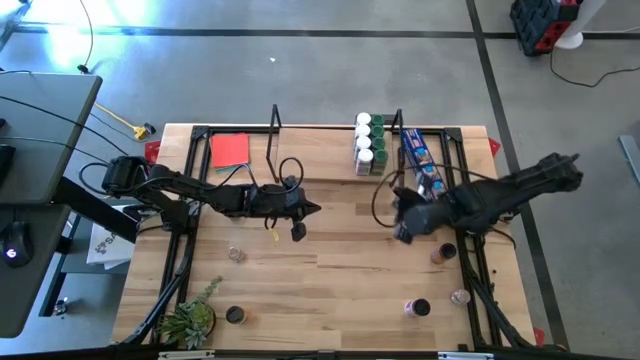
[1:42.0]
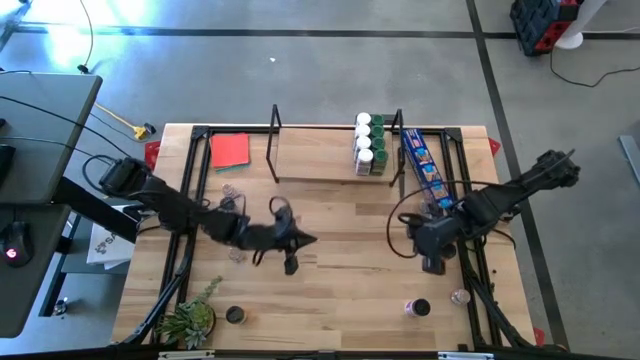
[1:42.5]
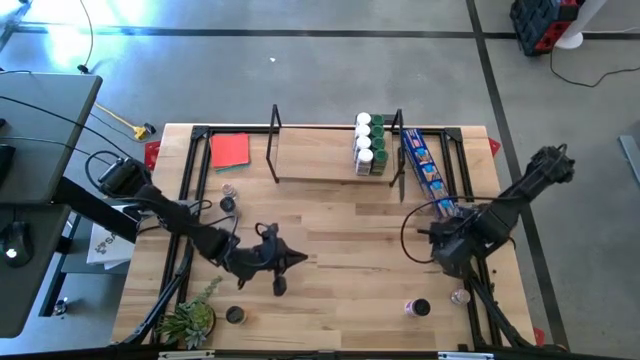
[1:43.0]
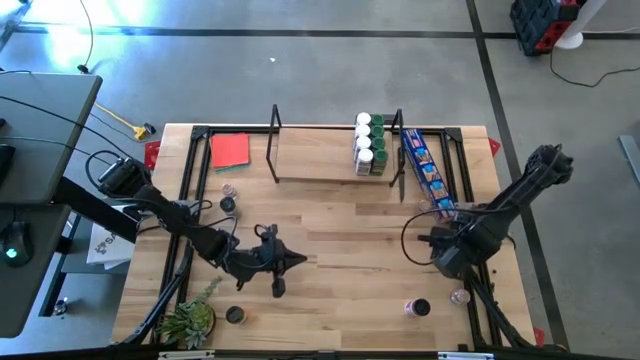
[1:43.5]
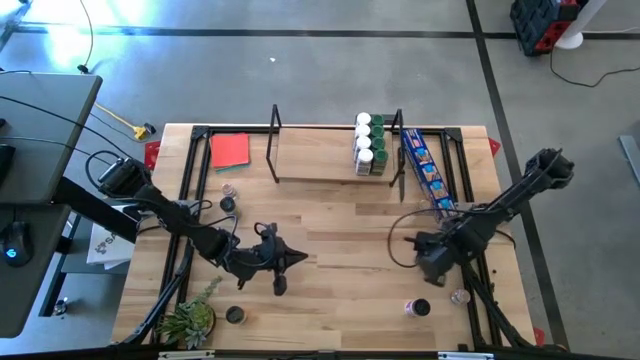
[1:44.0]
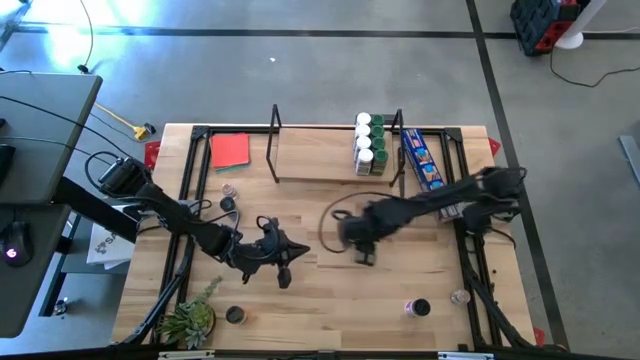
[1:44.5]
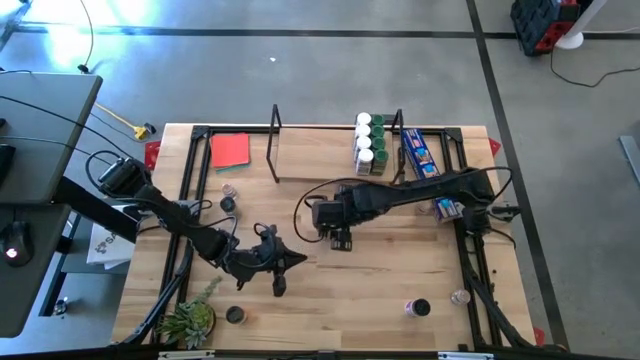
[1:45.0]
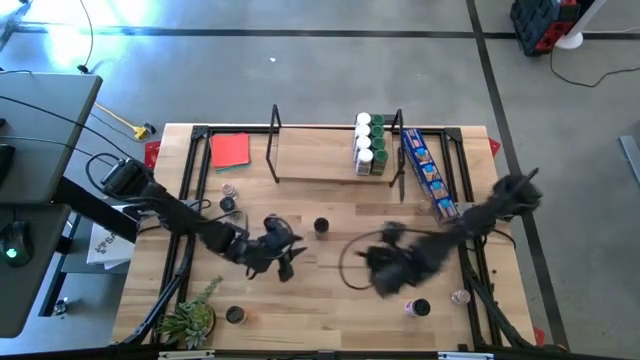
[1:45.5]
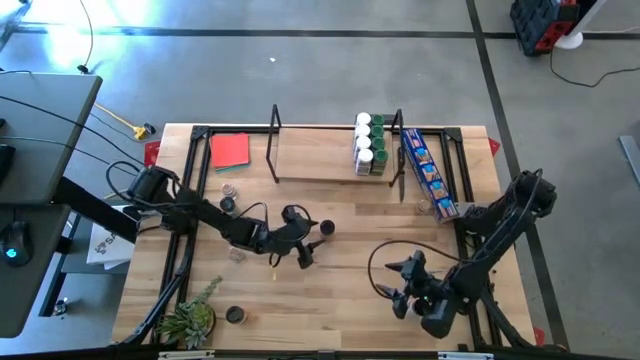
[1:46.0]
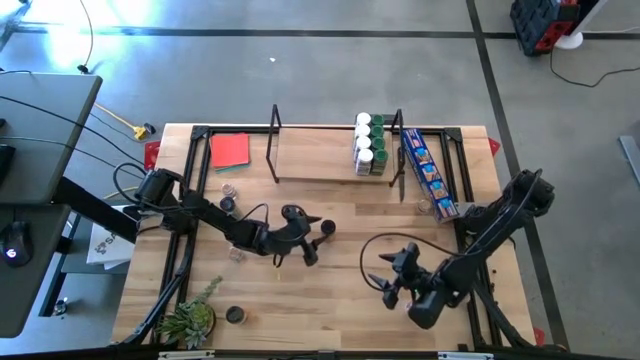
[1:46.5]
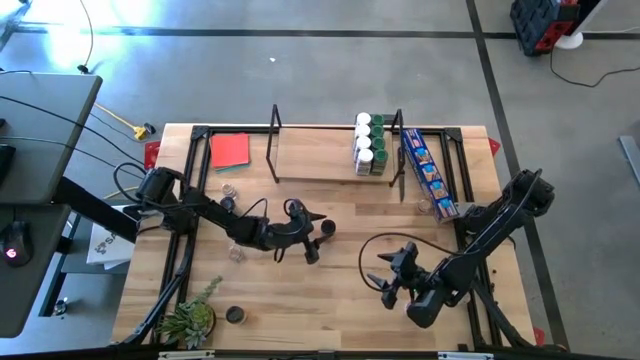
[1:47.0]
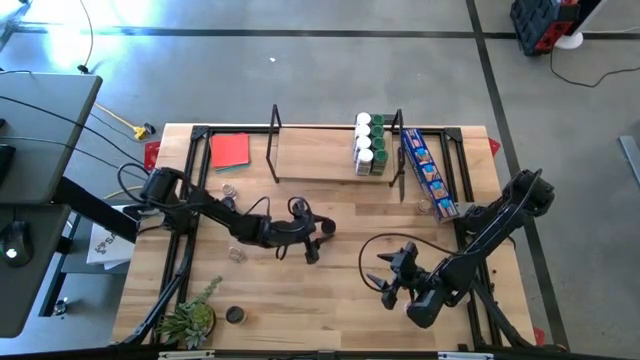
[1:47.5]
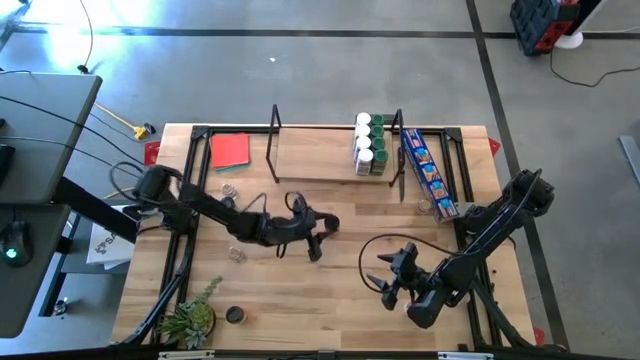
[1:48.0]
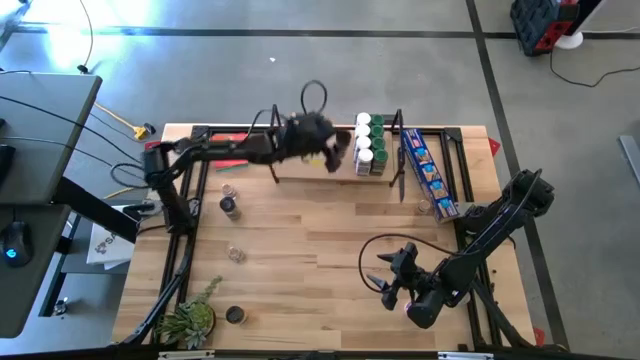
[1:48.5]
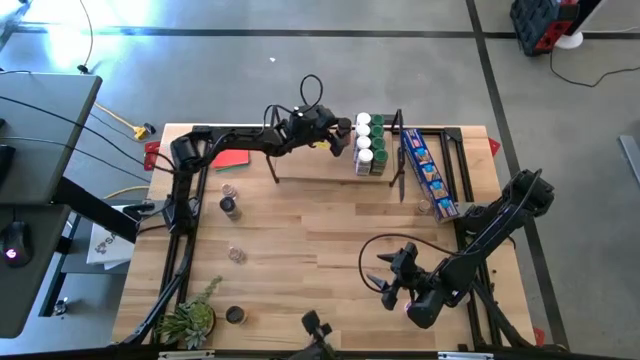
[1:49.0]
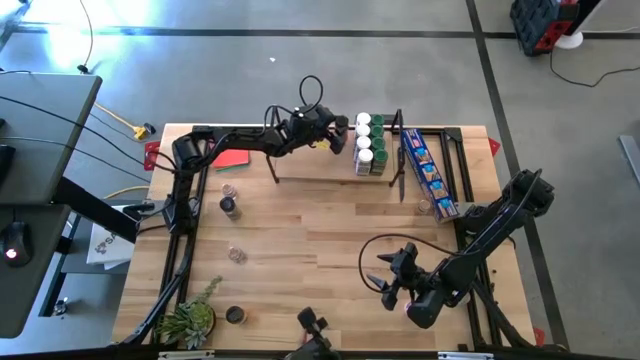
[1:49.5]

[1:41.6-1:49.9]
Task: Shelf spices
Put the top right black seasoning bottle on the shelf

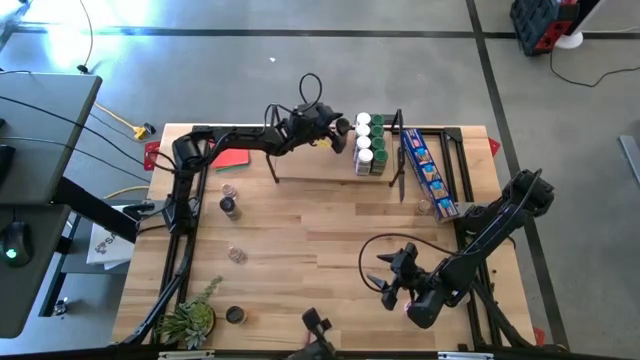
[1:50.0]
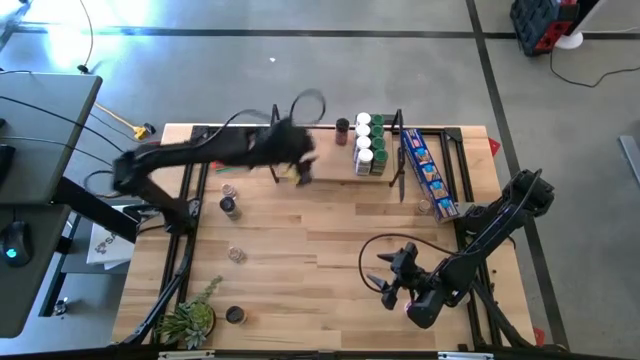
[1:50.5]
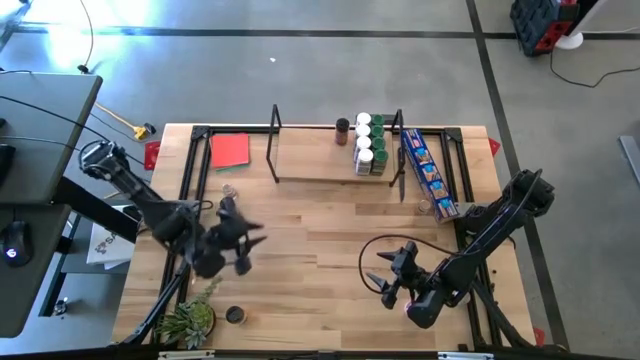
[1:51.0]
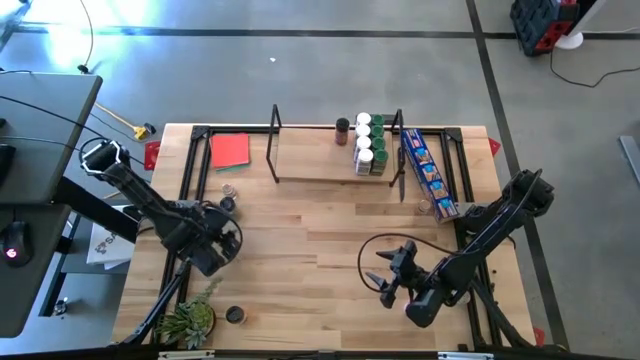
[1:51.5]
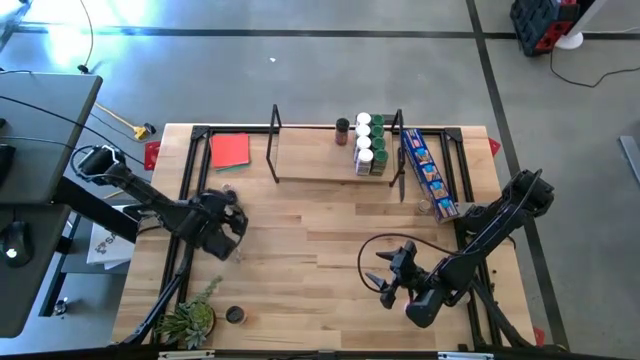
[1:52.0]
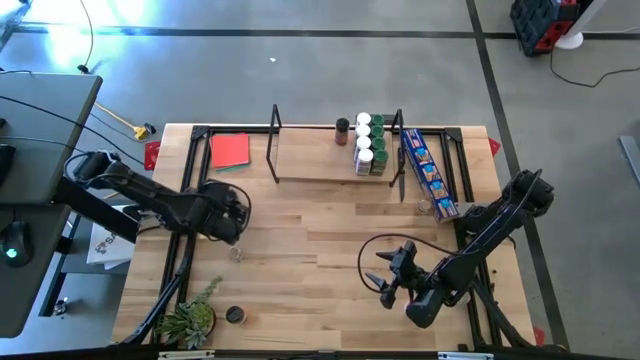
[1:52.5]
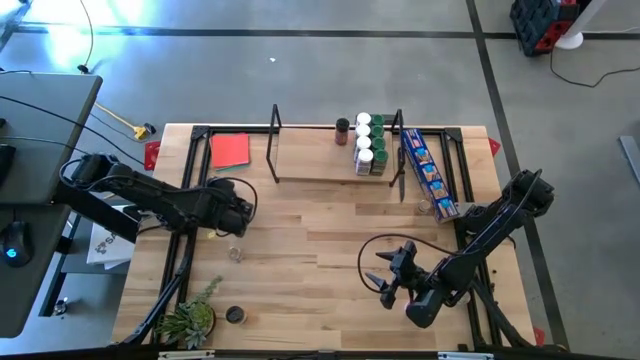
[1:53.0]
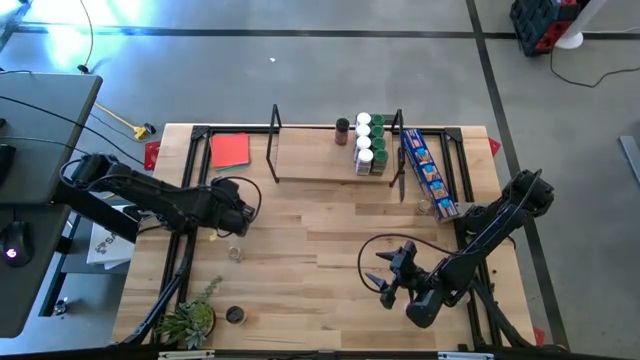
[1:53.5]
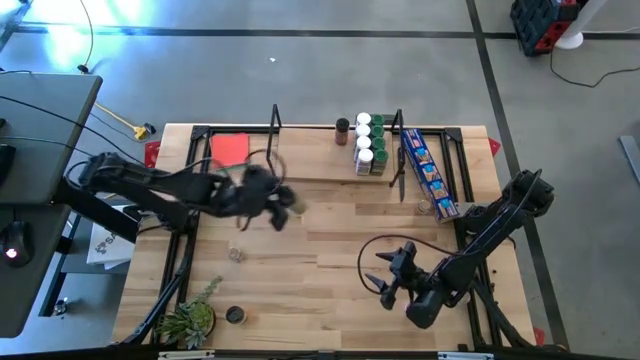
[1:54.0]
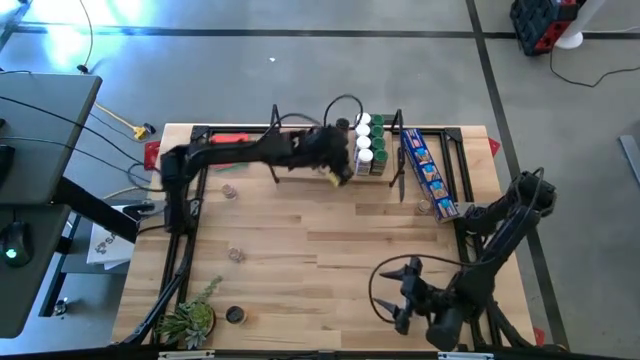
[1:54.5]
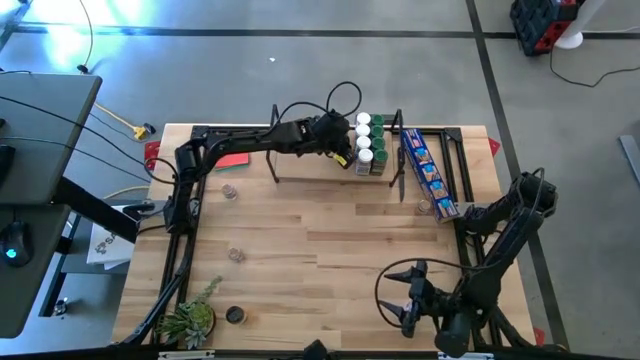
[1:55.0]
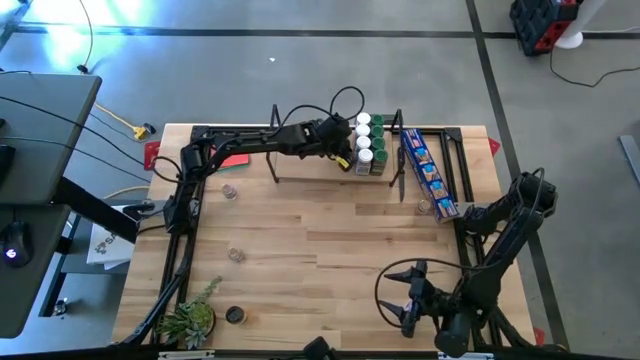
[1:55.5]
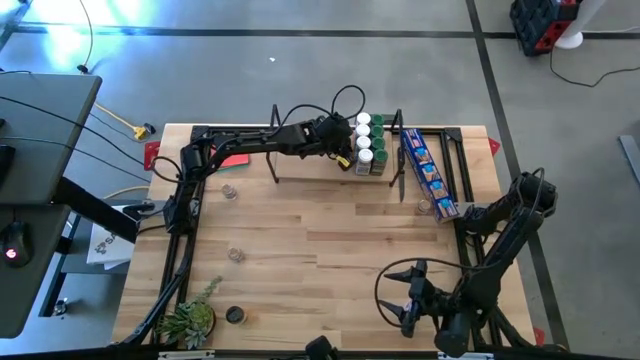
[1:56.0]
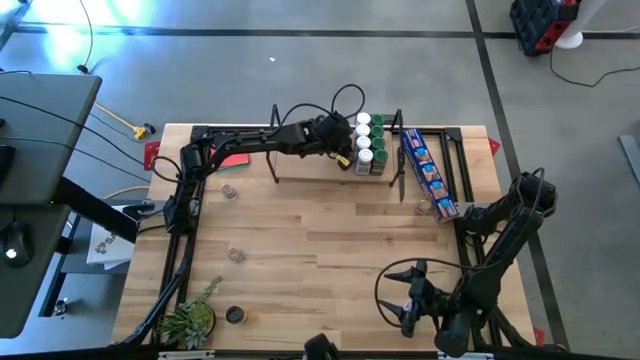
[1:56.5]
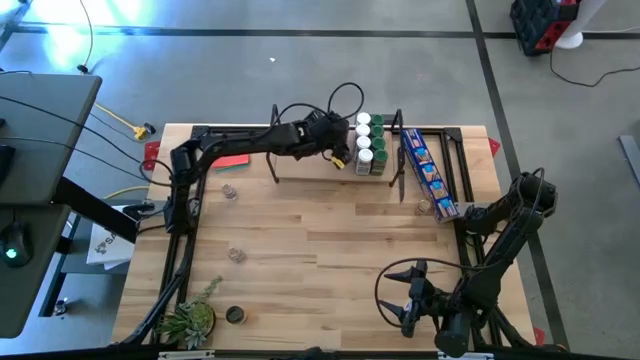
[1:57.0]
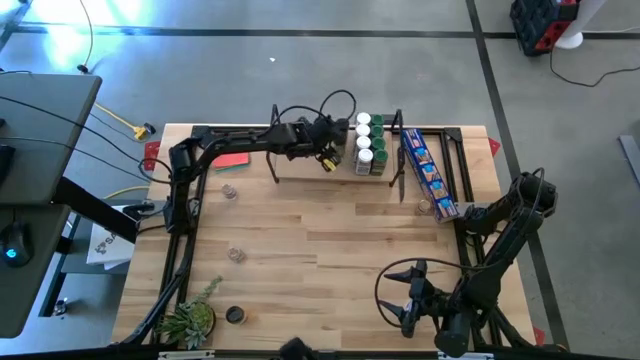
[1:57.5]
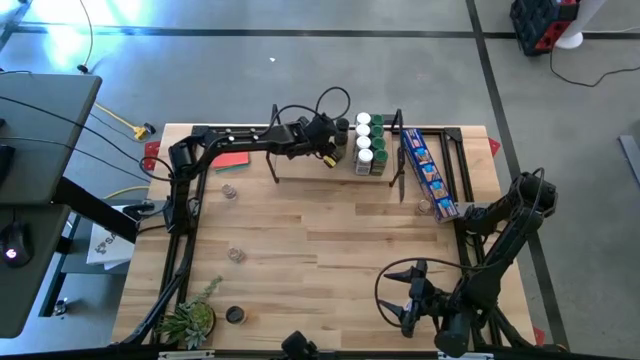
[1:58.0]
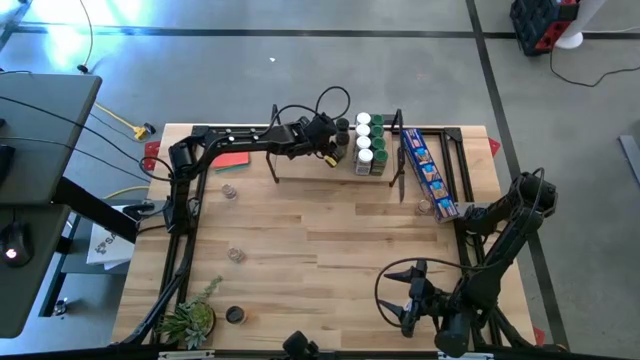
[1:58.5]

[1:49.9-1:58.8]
Put the top left black seasoning bottle on the shelf aligned with the other black seasoning bottle

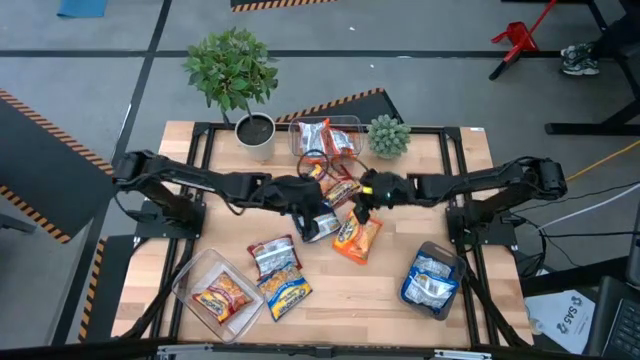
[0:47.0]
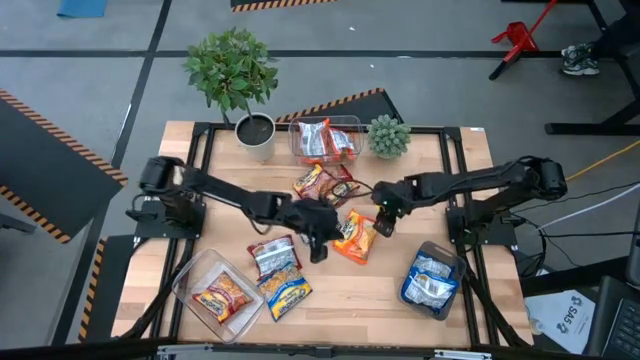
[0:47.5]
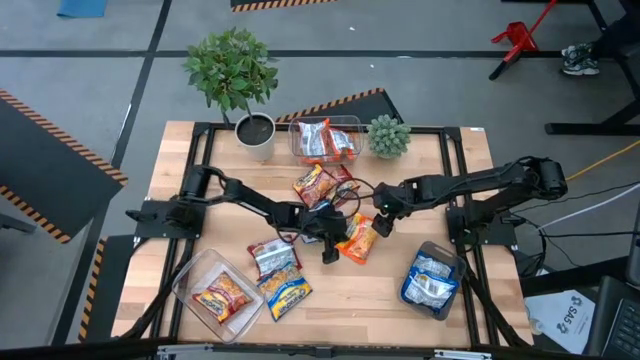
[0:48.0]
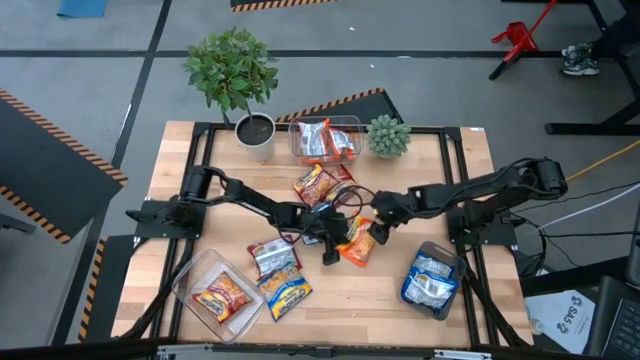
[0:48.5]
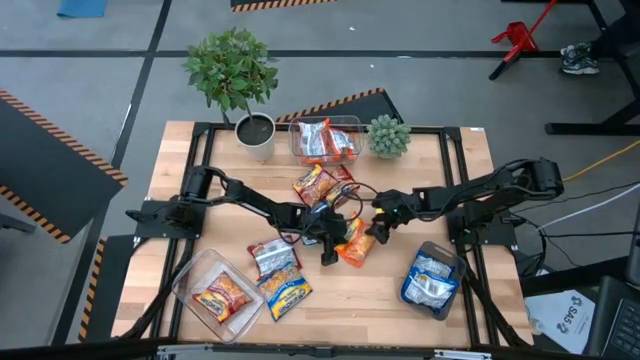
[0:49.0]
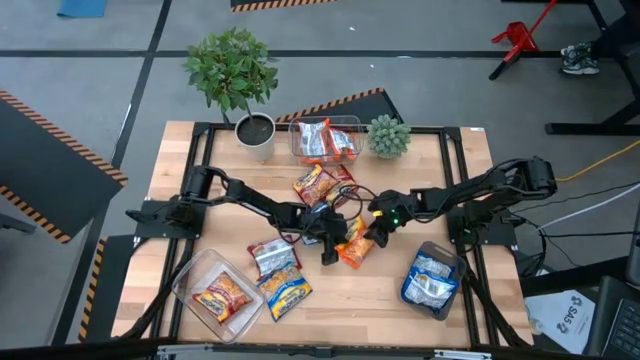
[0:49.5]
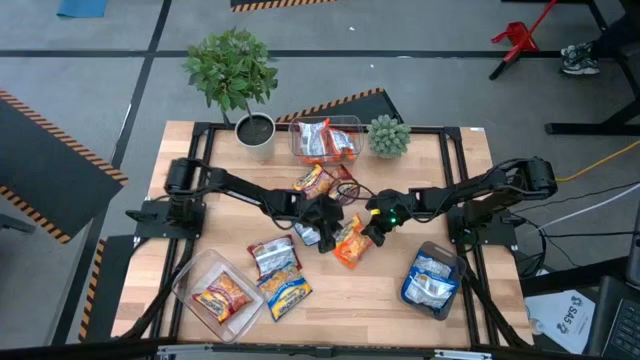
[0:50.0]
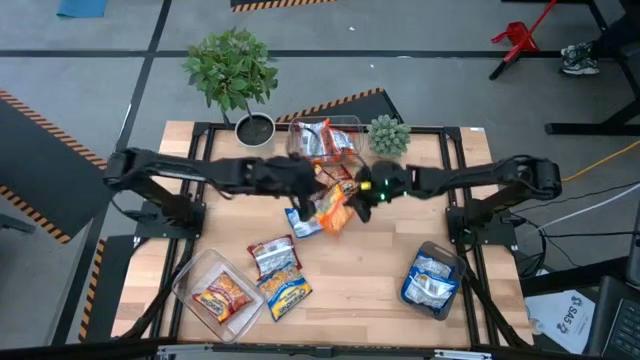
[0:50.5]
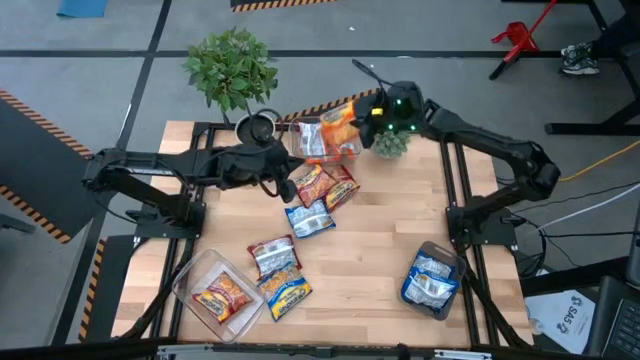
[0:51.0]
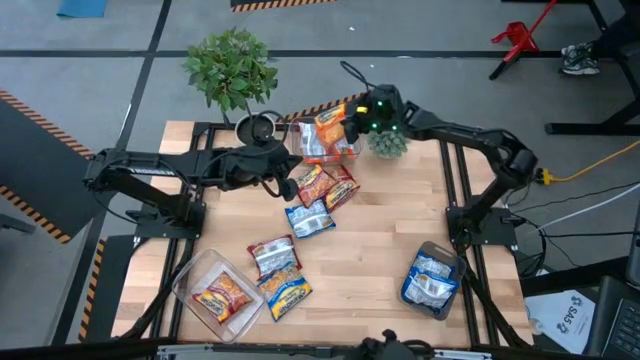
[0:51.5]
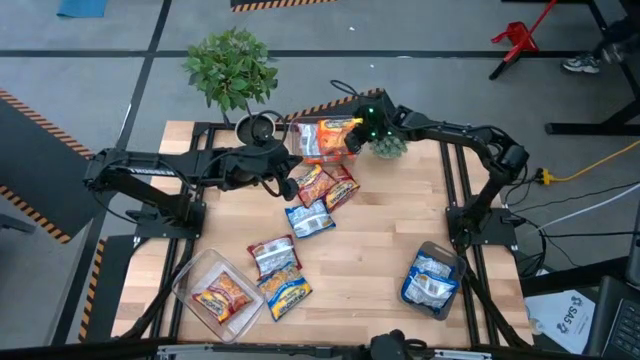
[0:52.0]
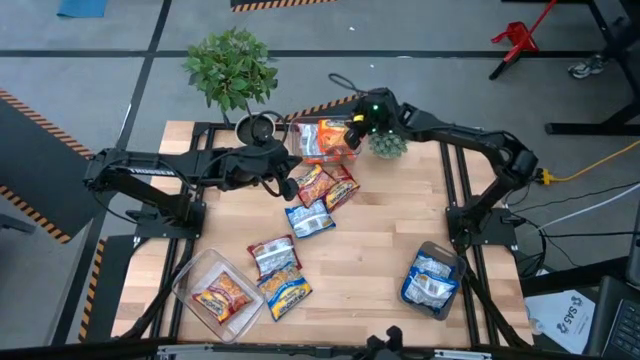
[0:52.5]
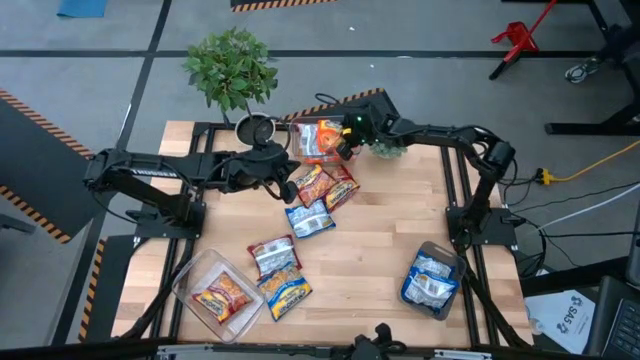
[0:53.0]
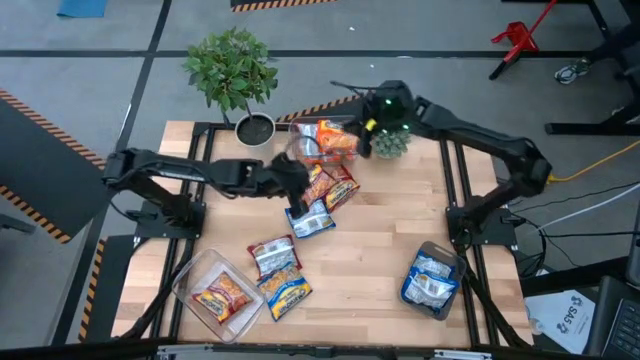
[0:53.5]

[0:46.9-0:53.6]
Task: Sort Maruchan noodles
Put the orange noodle pack into the top transparent bin
